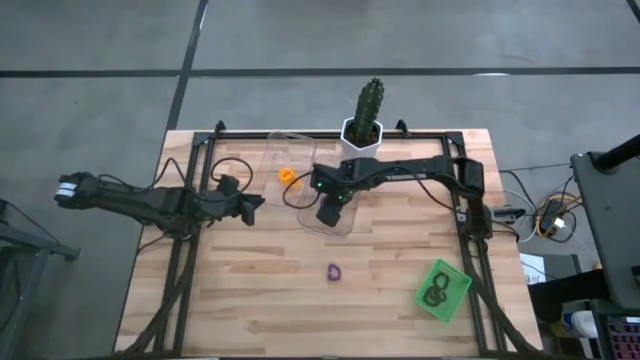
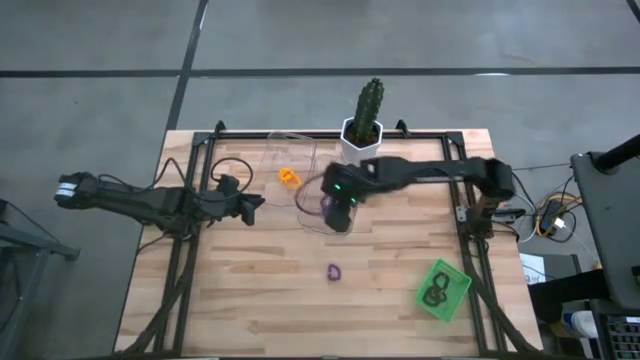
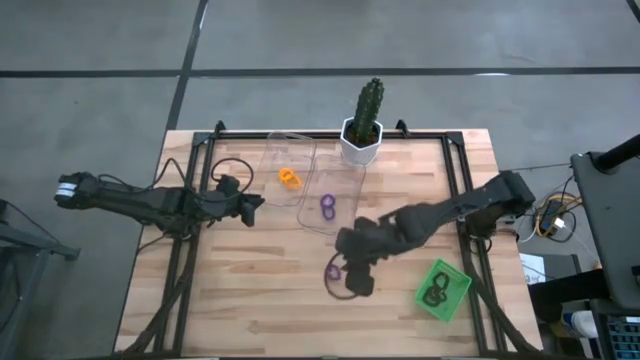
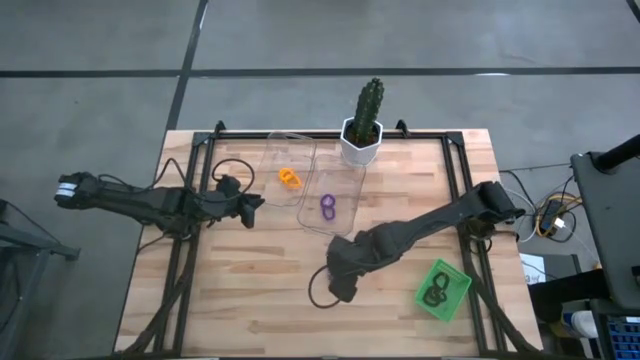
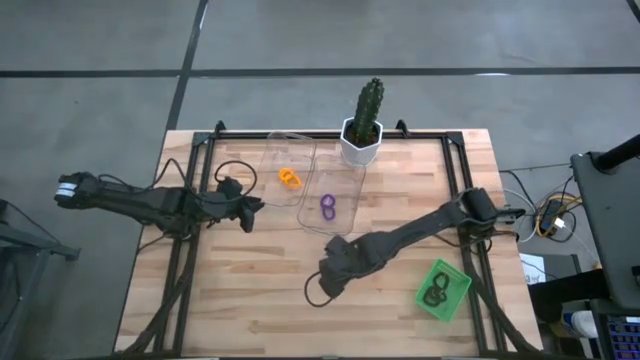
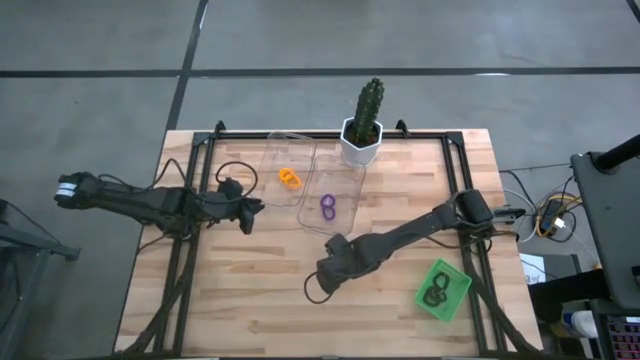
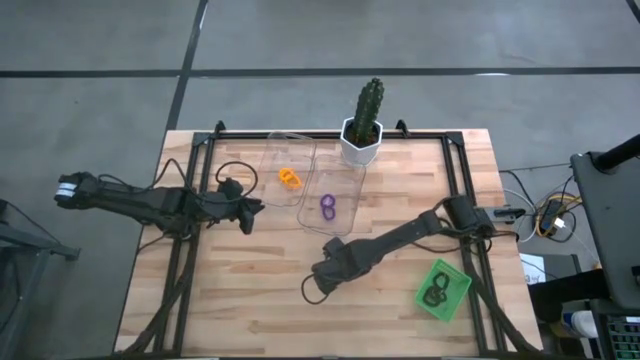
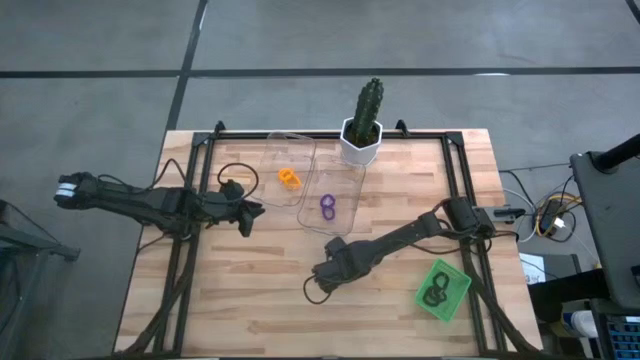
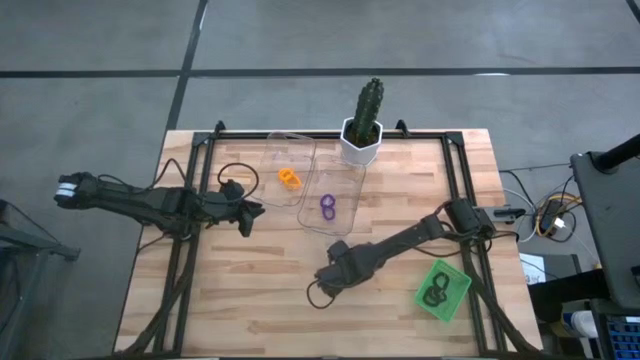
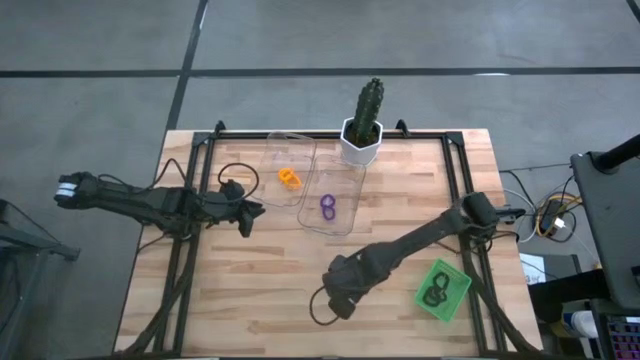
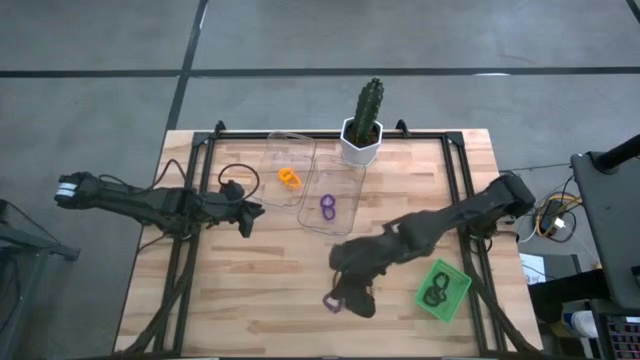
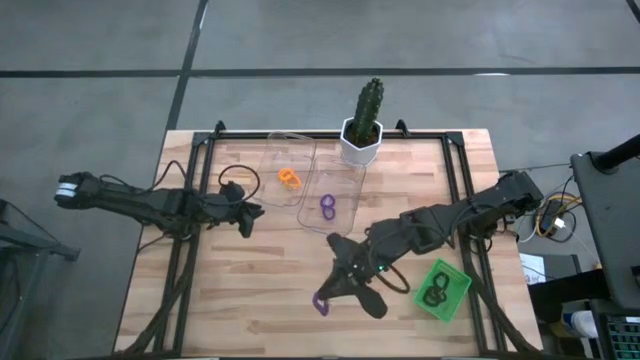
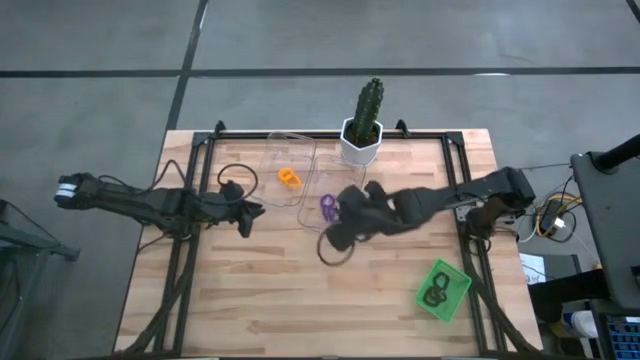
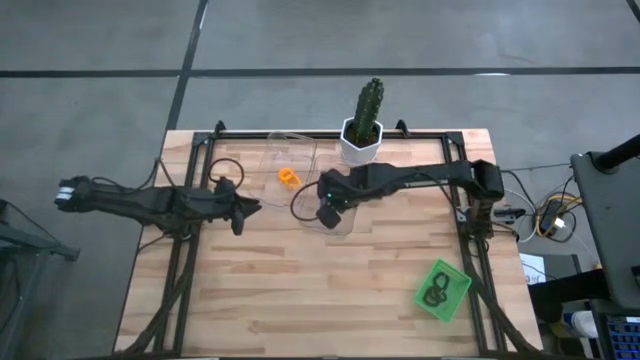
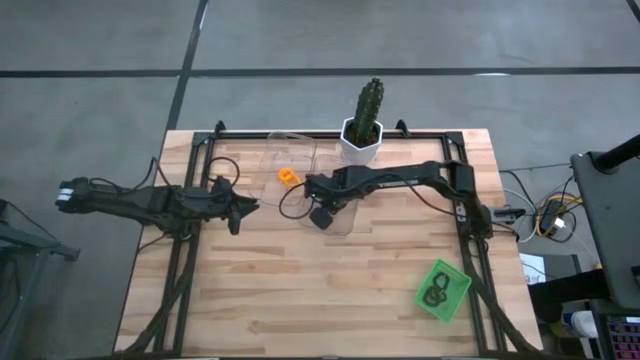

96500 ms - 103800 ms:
Task: Sort spring keychains
Put the violet spring keychain into the right transparent bin

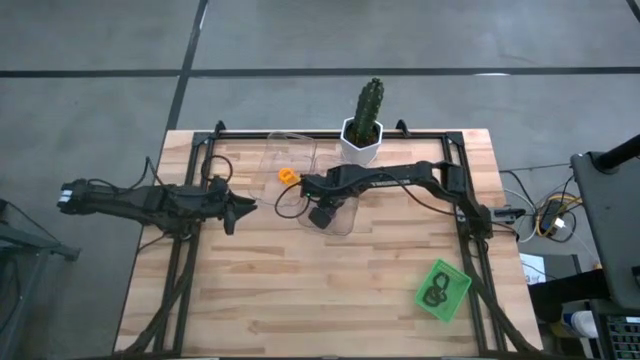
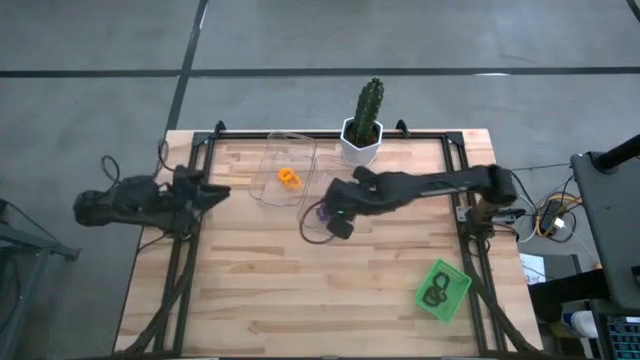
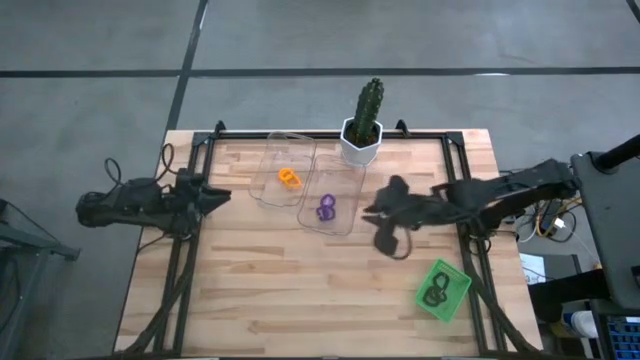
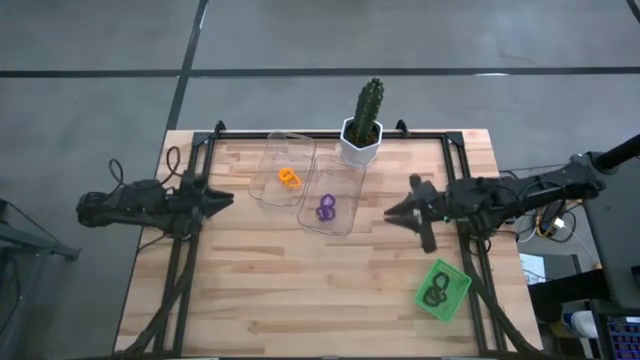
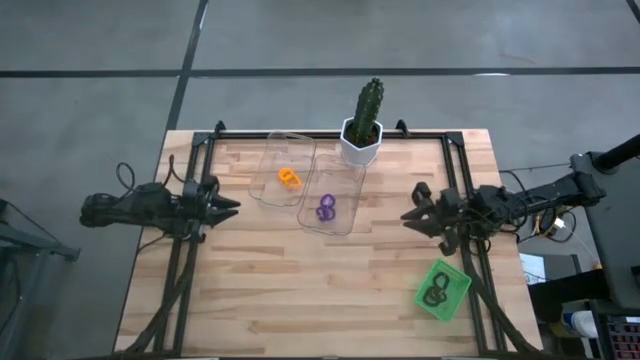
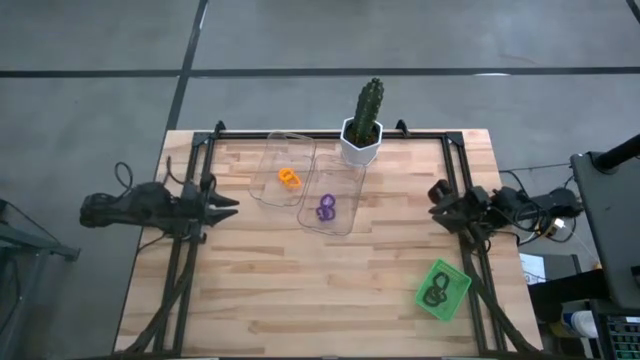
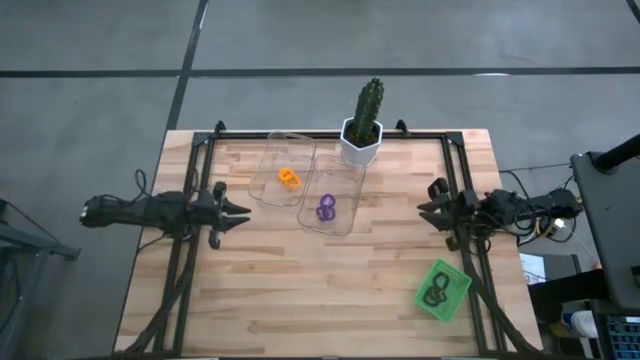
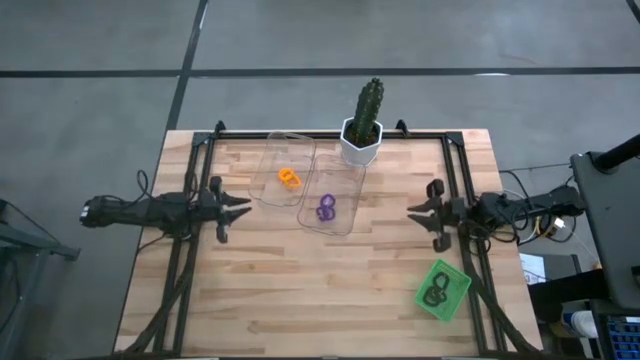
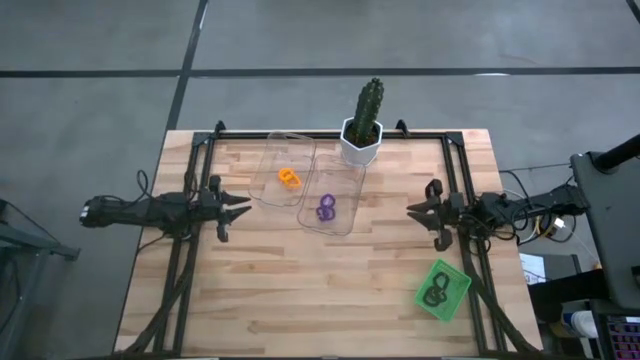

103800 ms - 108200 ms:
Return to Home Position

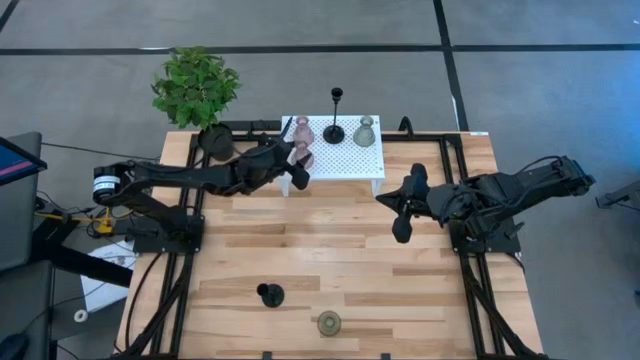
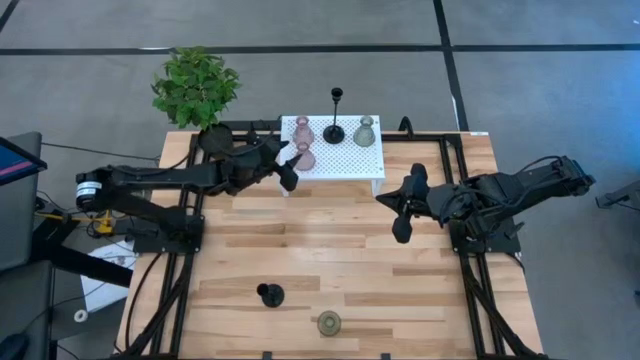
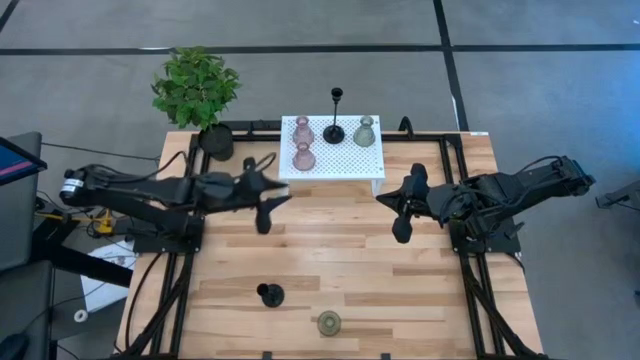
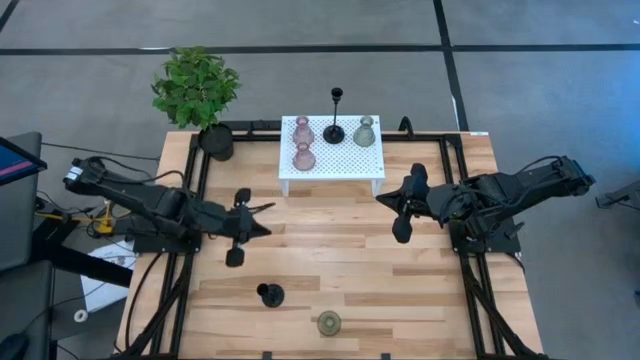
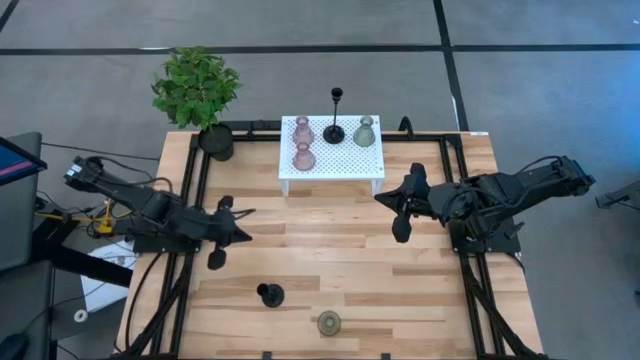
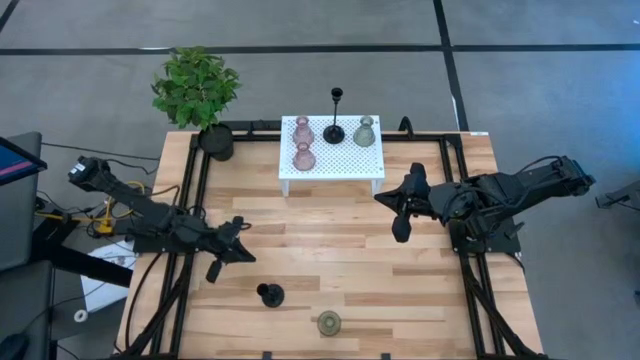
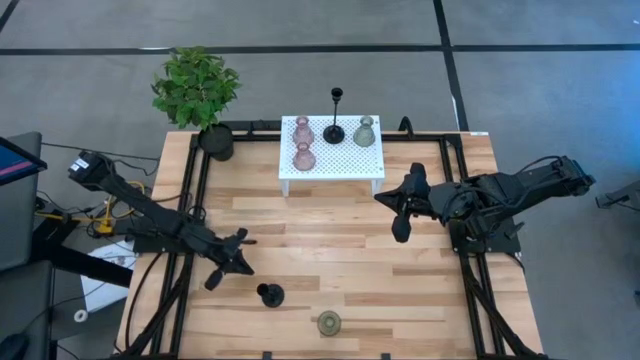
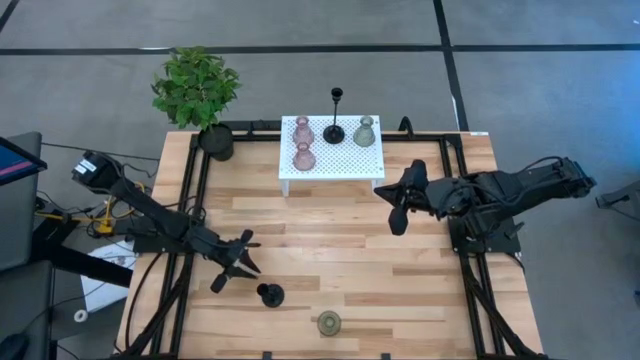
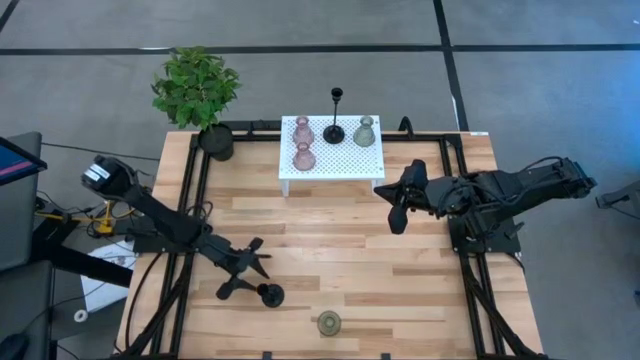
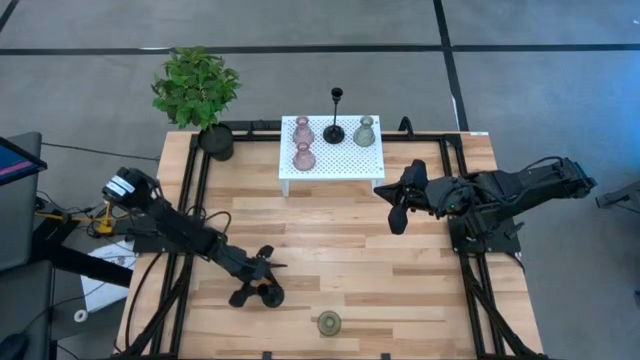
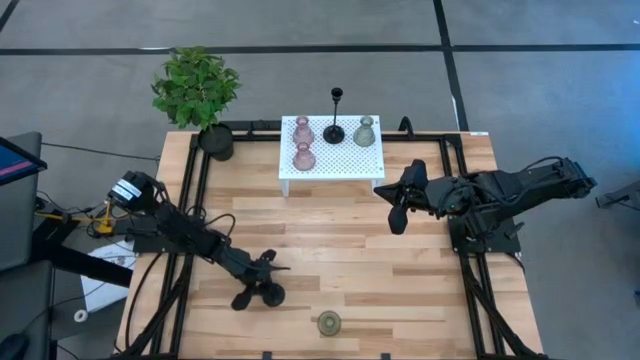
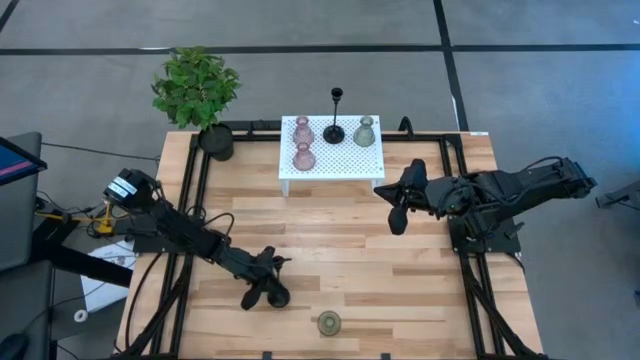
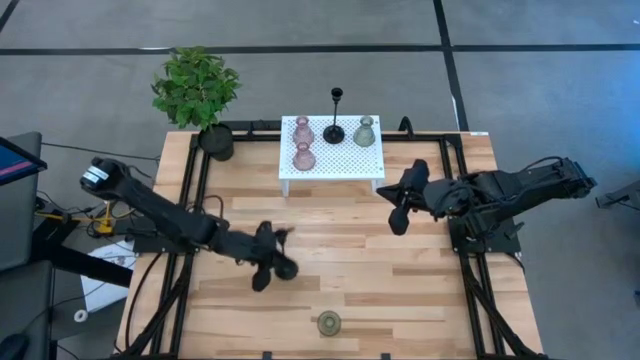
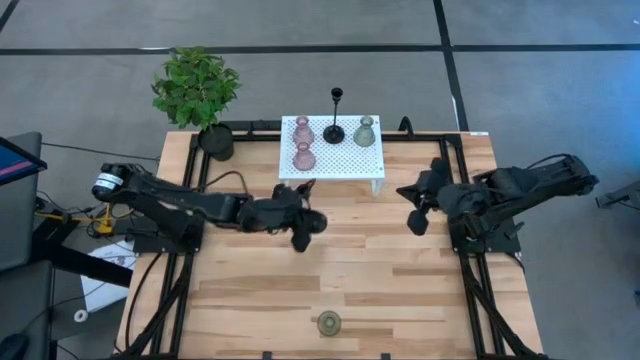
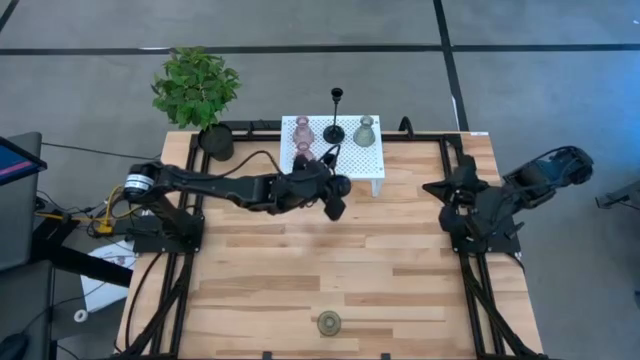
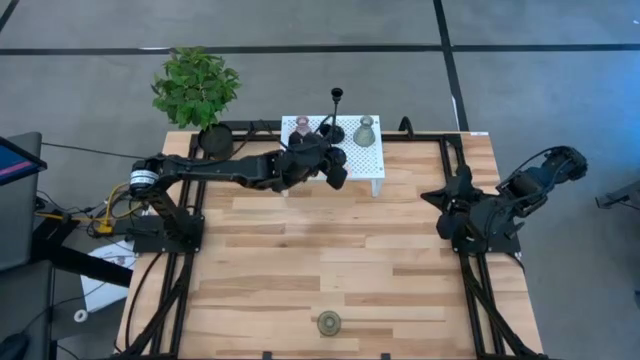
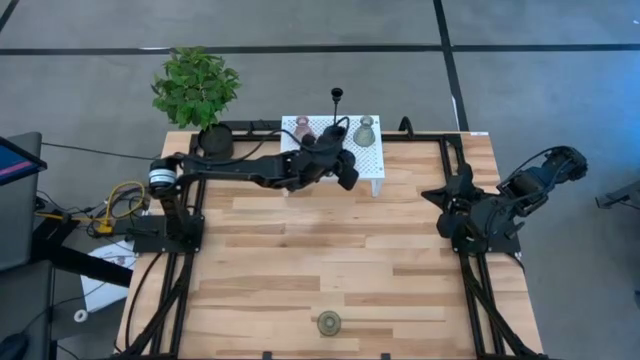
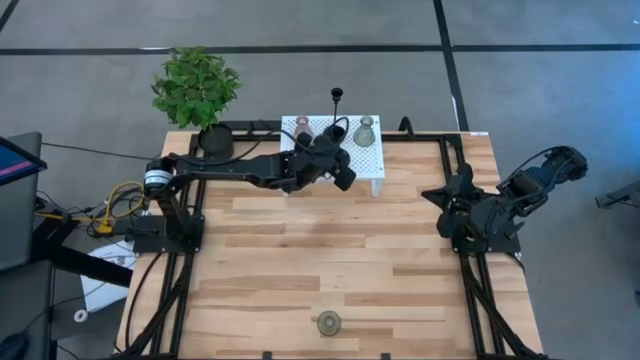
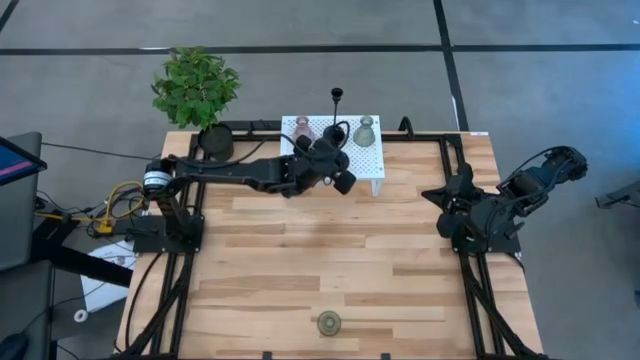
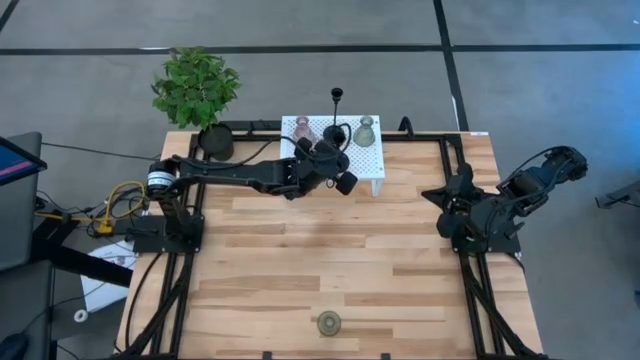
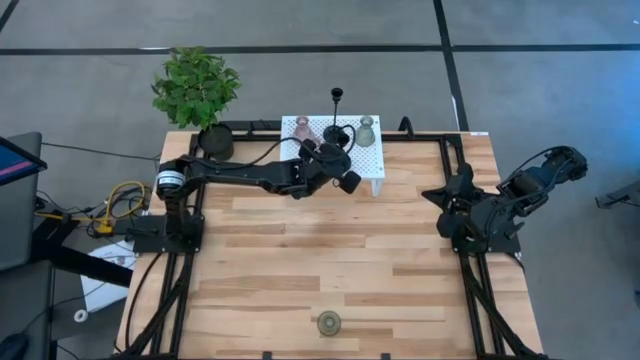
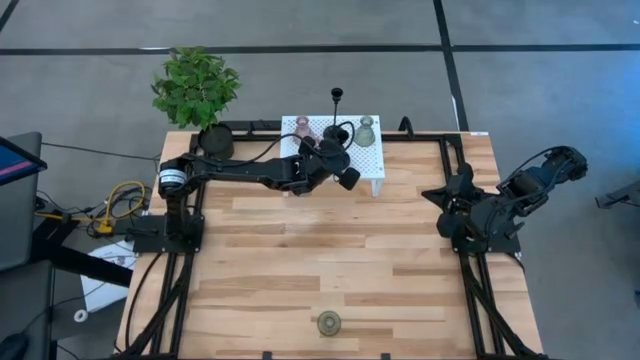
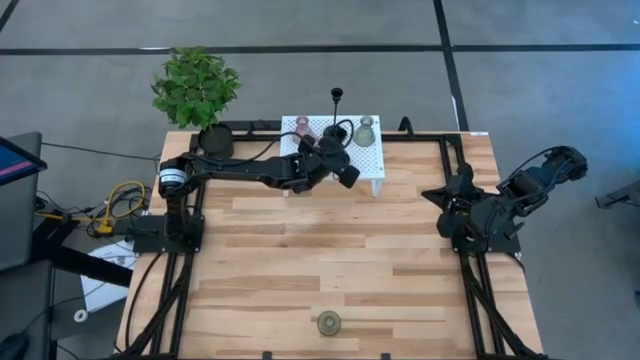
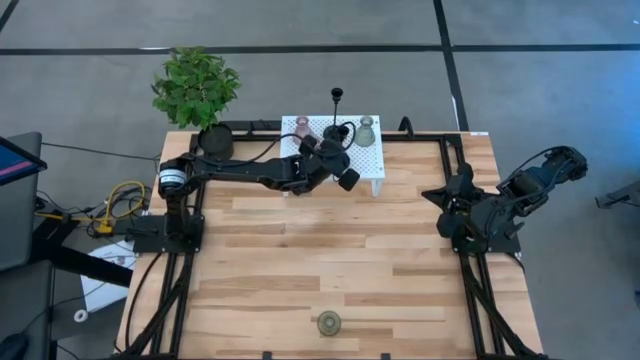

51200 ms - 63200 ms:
Task: Pick & Place candle stick holders
Put the black candle holder on the shelf
